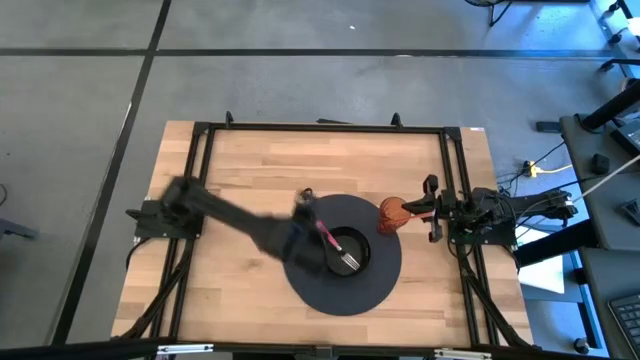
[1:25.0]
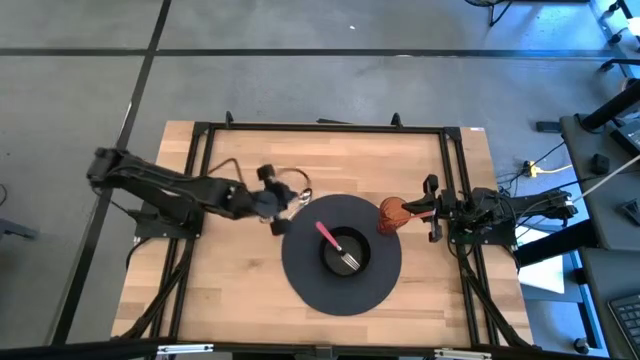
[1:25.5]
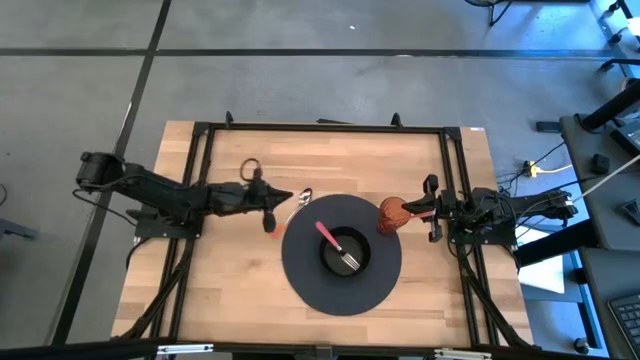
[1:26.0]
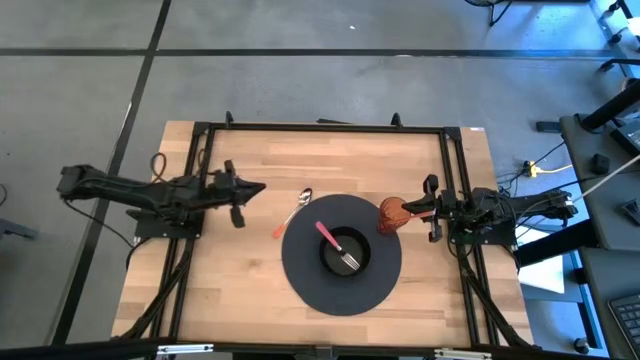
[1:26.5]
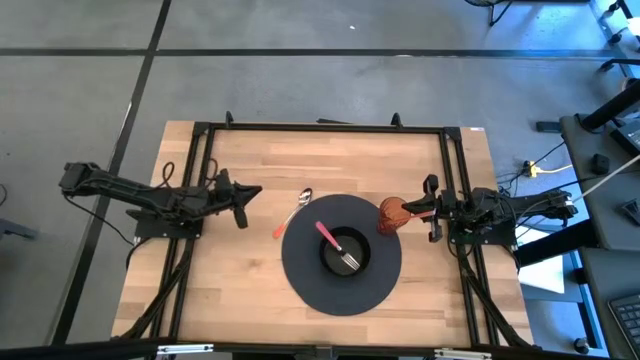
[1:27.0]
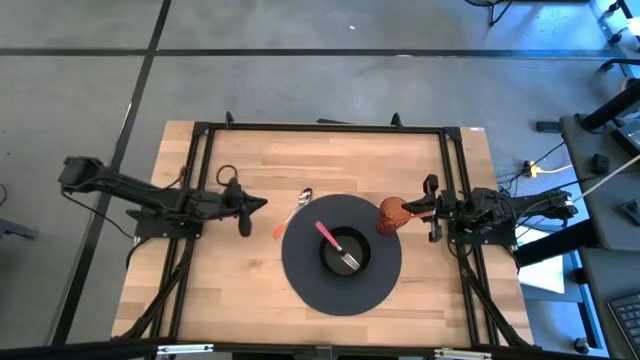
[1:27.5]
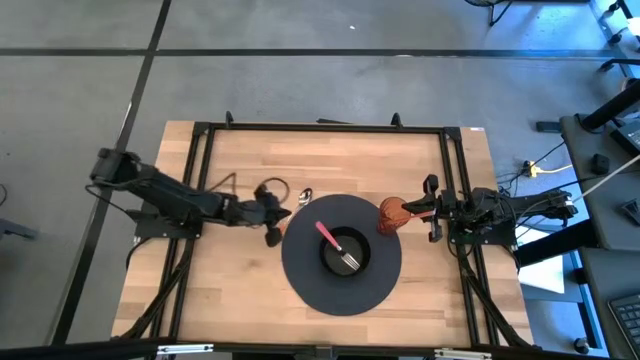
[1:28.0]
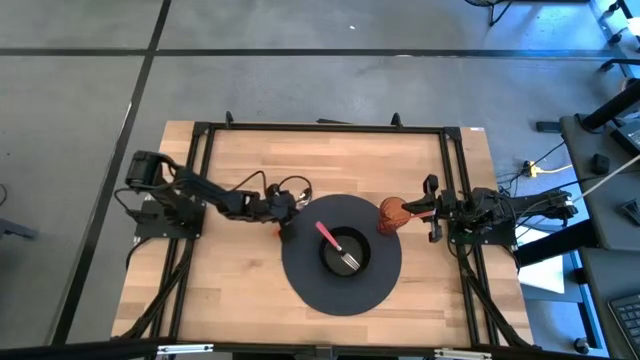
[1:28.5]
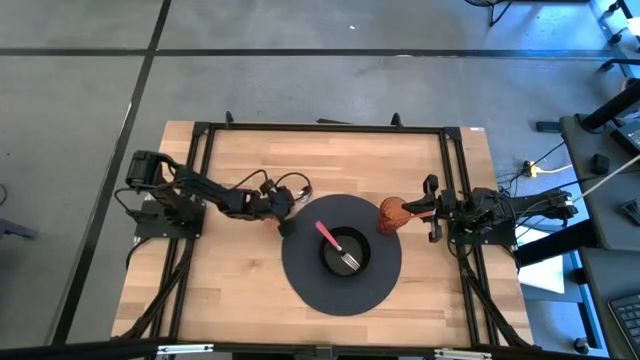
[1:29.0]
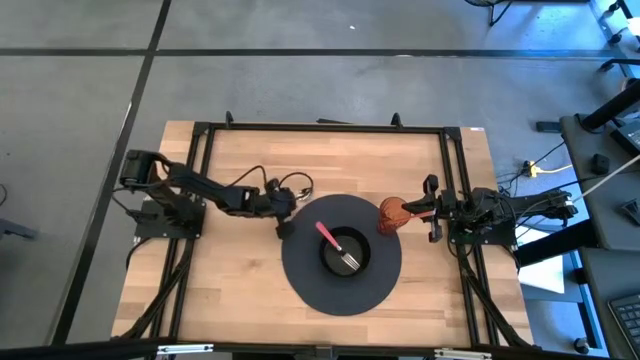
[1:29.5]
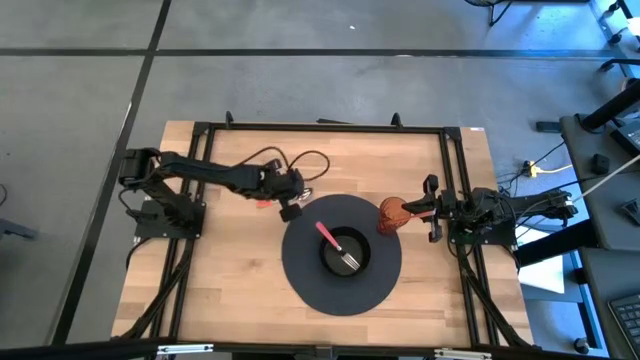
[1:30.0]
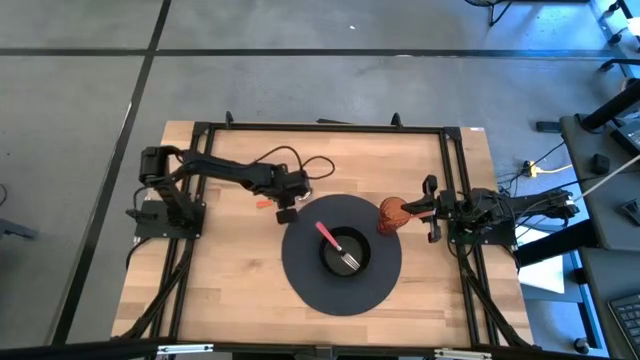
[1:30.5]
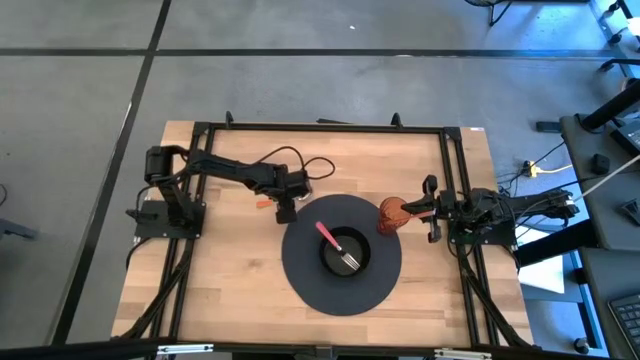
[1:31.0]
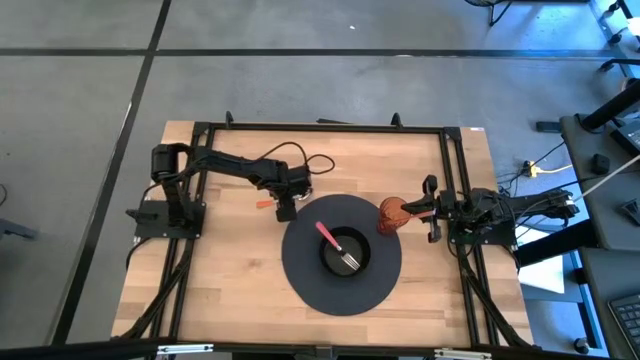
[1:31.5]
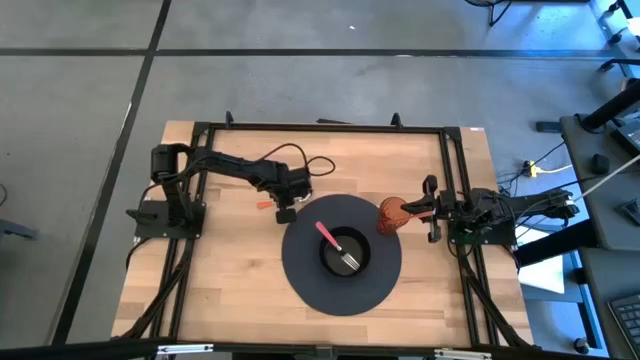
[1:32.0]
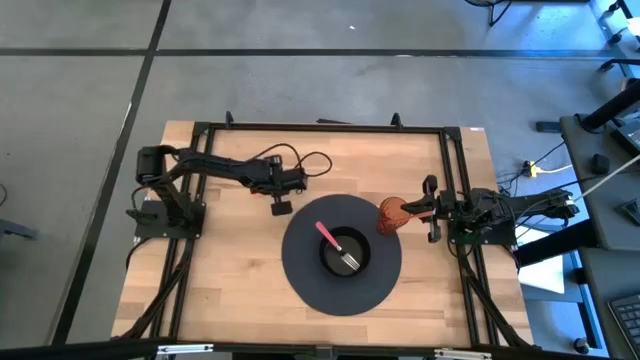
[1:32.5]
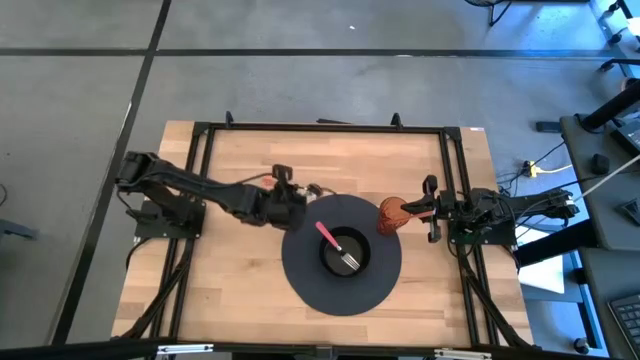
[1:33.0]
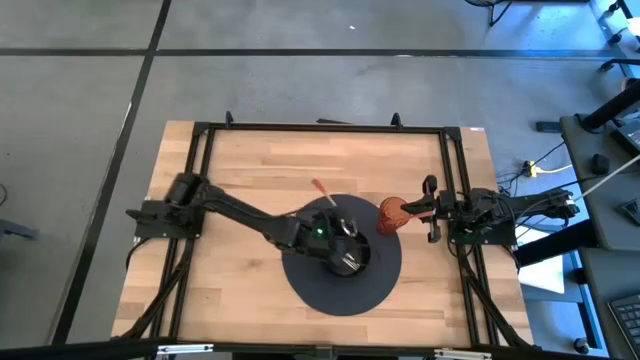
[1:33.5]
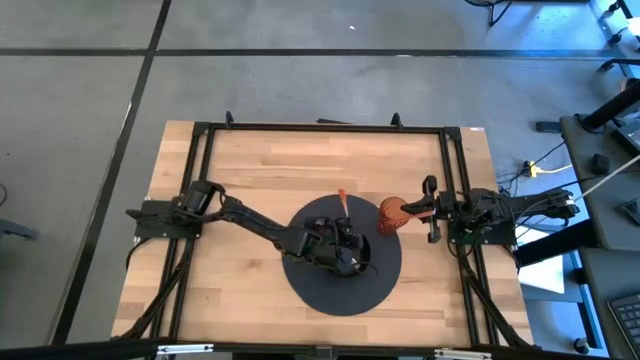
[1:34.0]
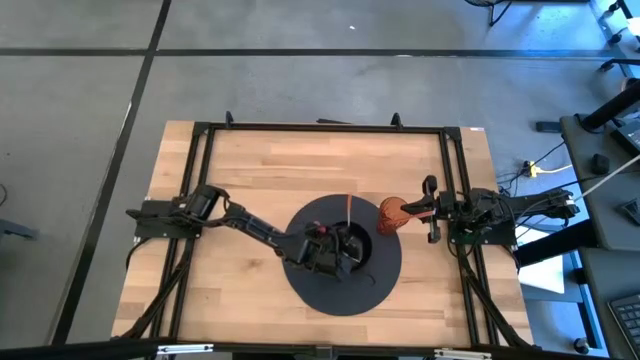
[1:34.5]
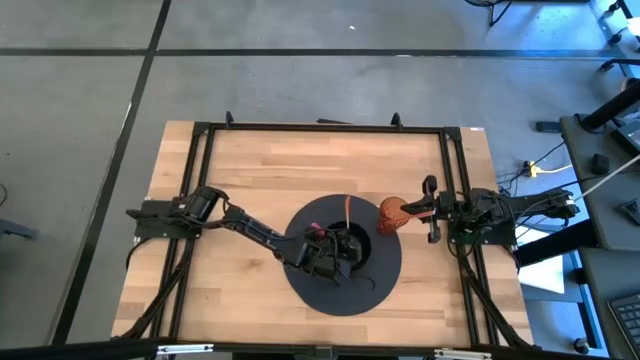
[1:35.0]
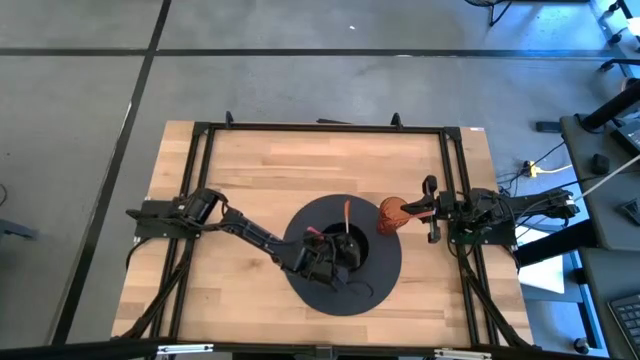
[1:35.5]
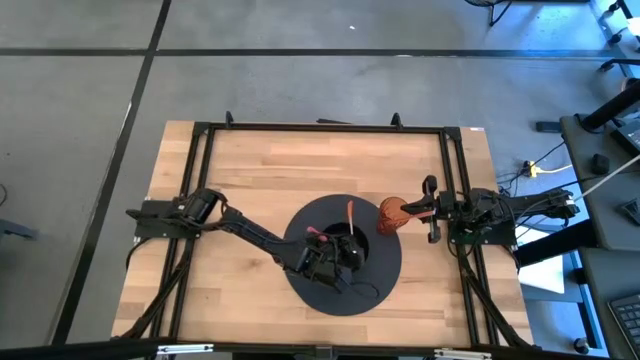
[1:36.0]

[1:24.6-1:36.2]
Task: Pick & Place Utensil
Put the orange spoon into the black bowl on the gray mat

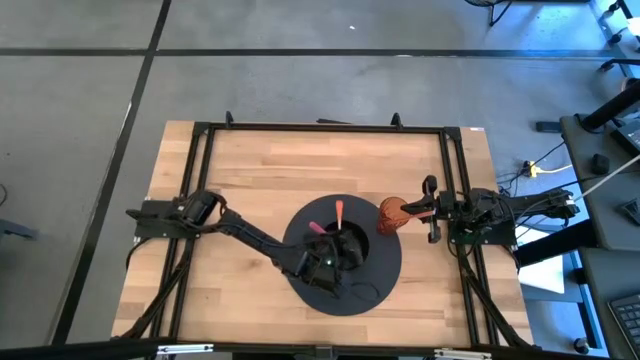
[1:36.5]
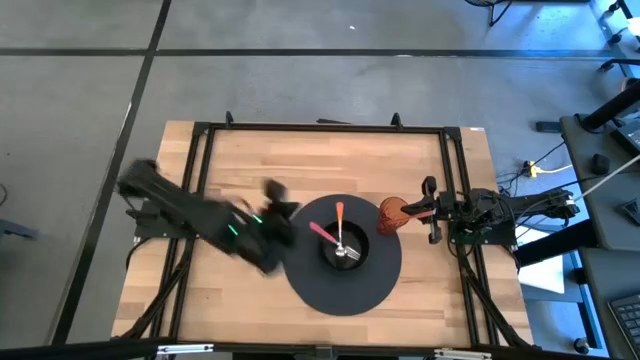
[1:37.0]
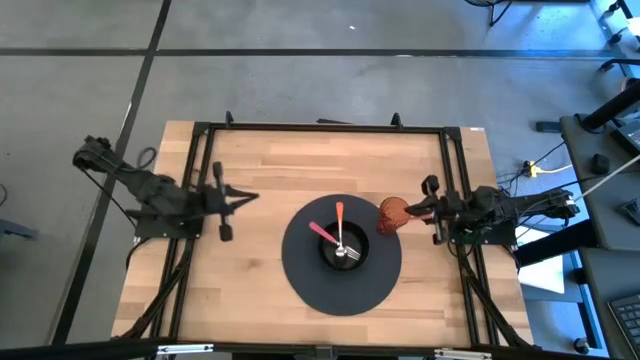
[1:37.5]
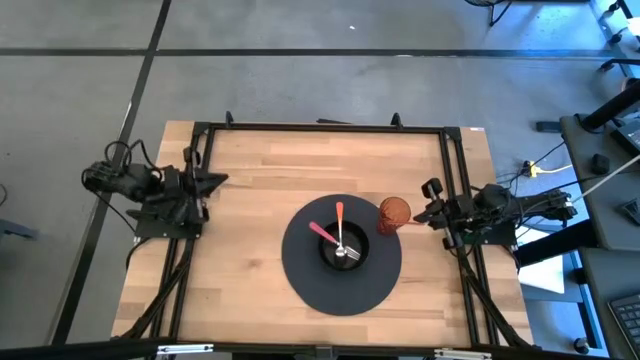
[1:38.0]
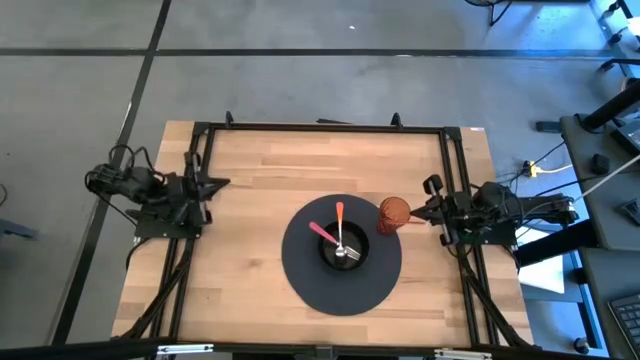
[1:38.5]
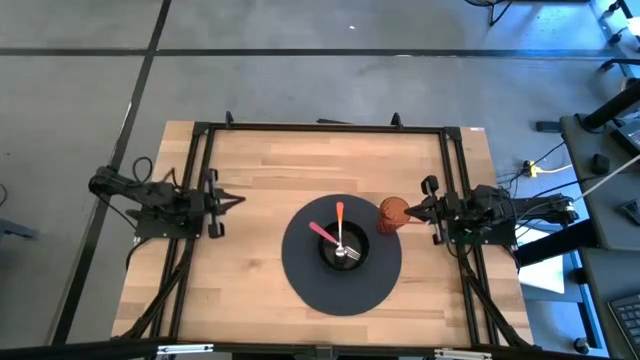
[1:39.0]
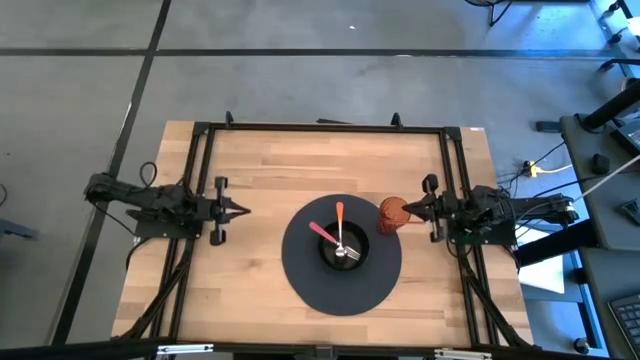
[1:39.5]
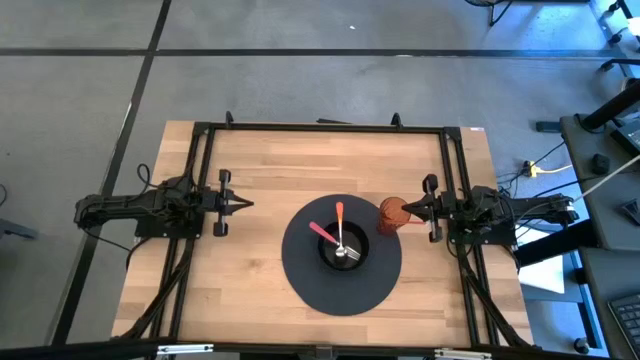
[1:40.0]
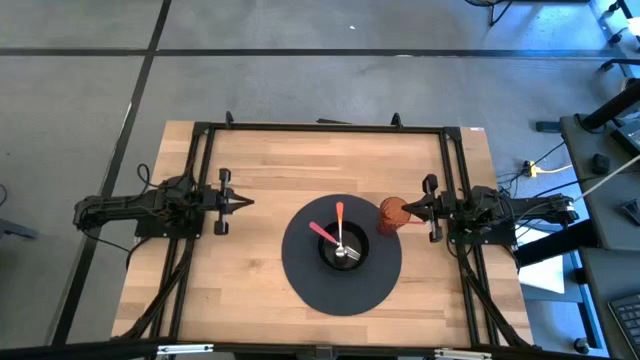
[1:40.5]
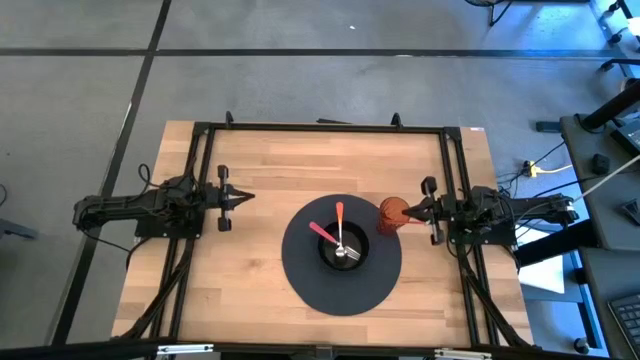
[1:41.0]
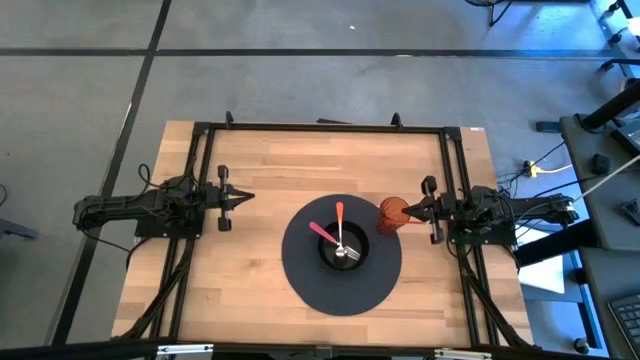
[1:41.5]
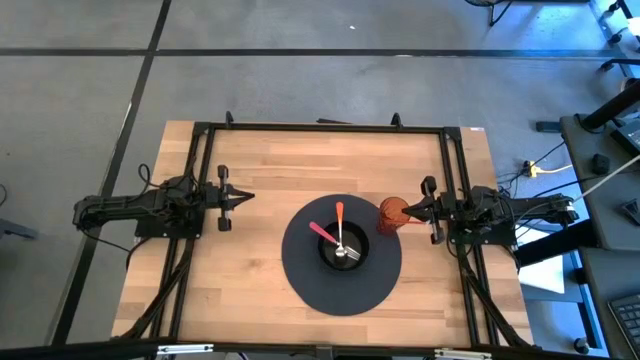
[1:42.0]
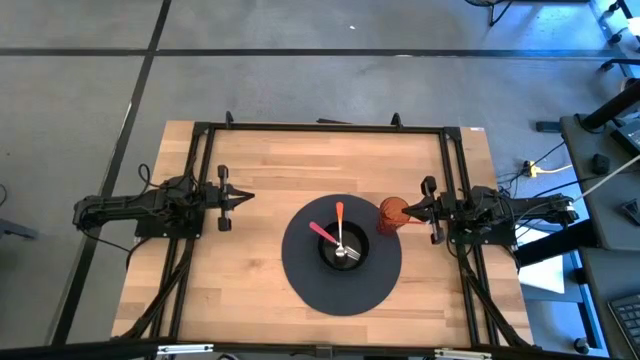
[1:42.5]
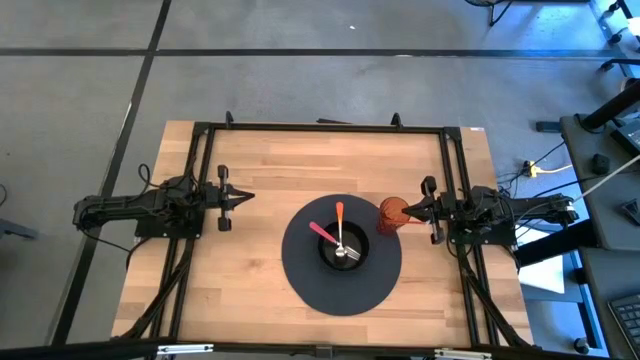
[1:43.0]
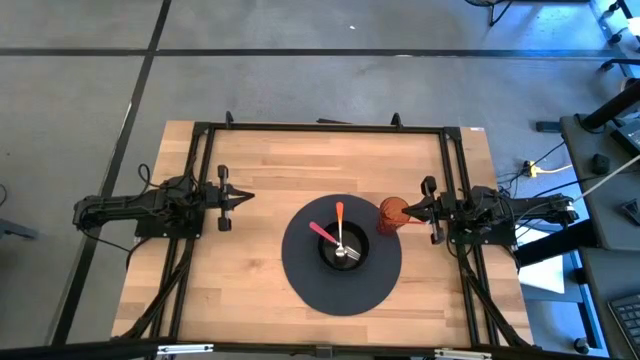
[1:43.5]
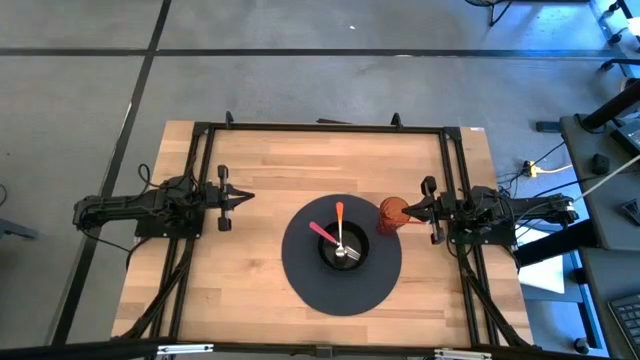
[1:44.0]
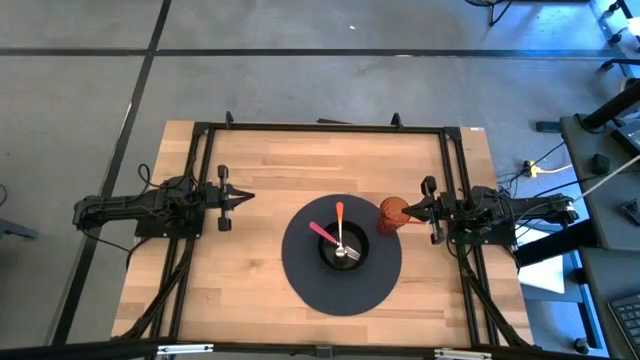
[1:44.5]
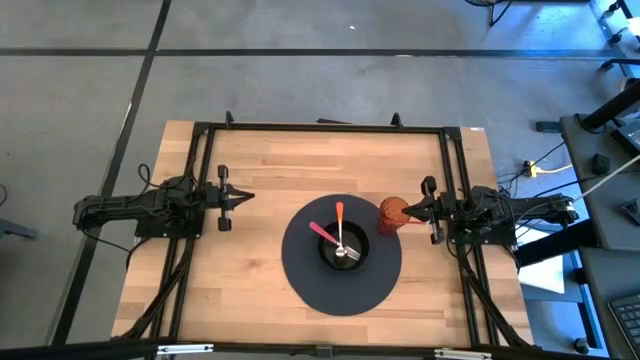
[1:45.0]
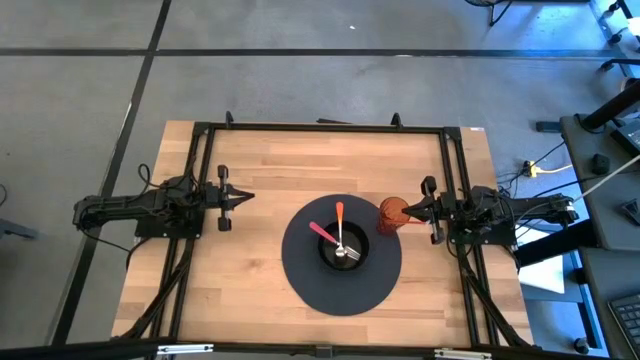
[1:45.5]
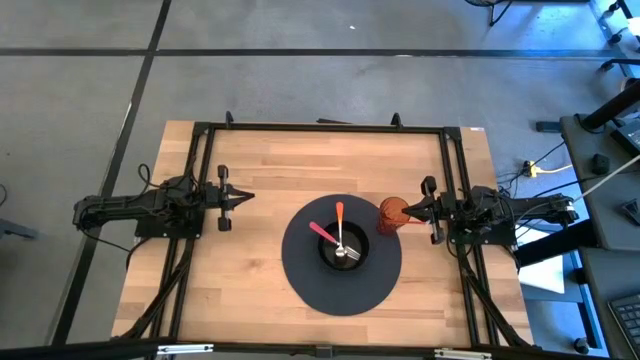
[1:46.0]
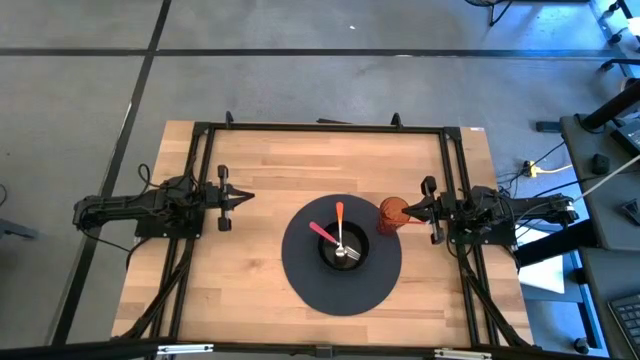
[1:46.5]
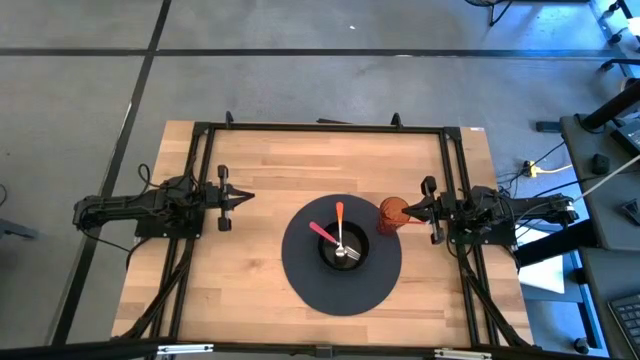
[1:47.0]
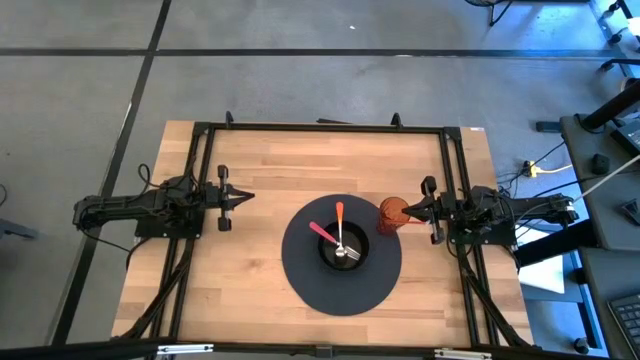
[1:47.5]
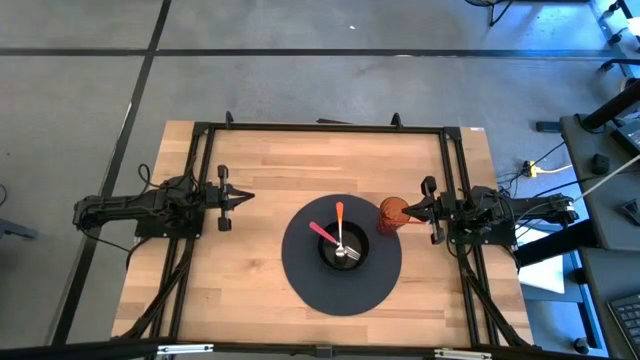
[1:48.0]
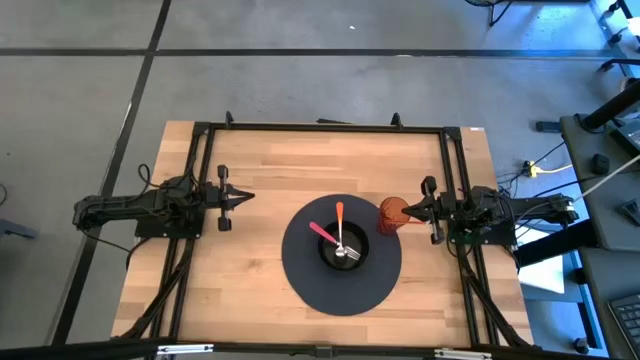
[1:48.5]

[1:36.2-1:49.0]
Return to Home Position
